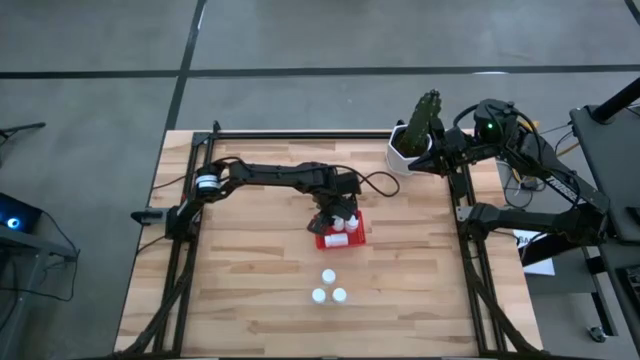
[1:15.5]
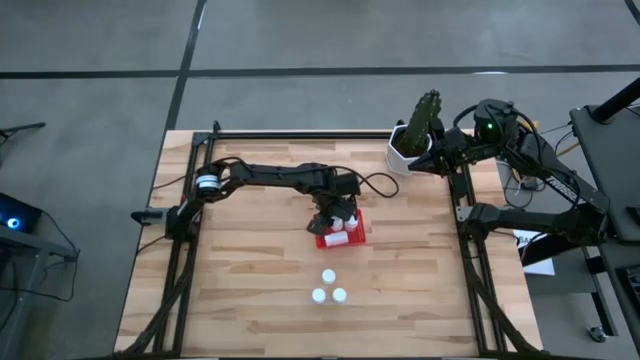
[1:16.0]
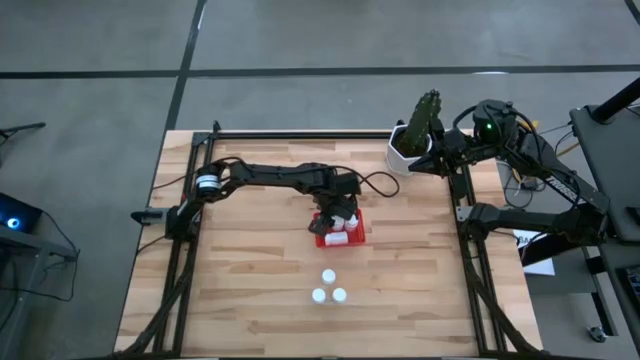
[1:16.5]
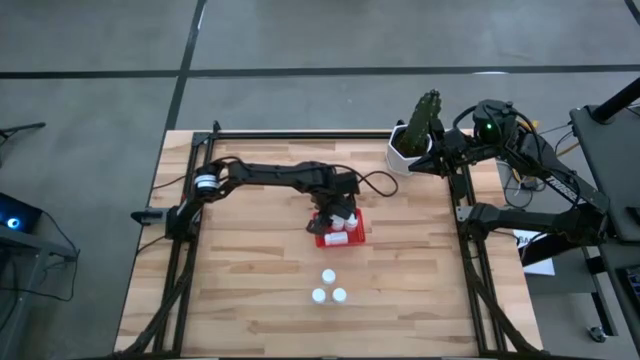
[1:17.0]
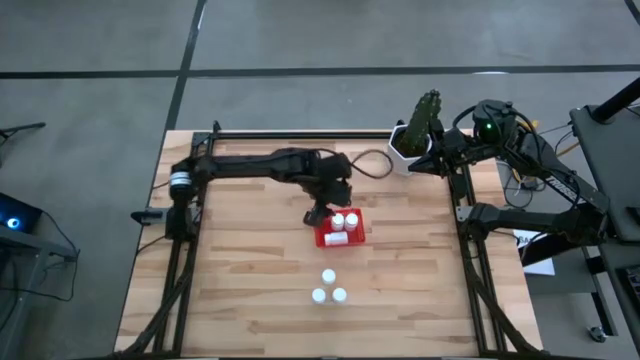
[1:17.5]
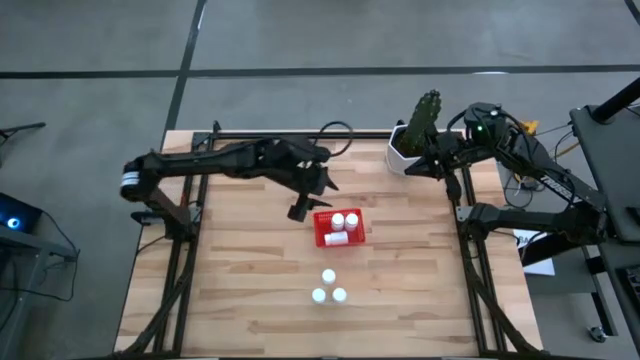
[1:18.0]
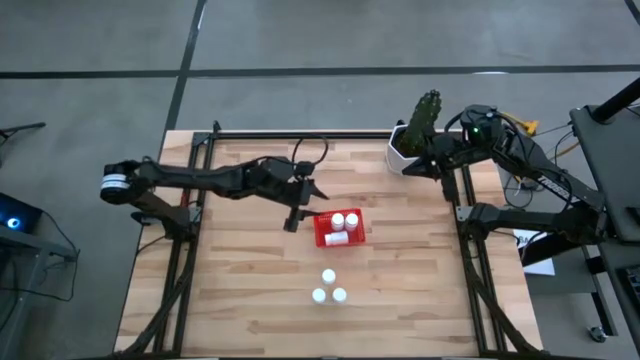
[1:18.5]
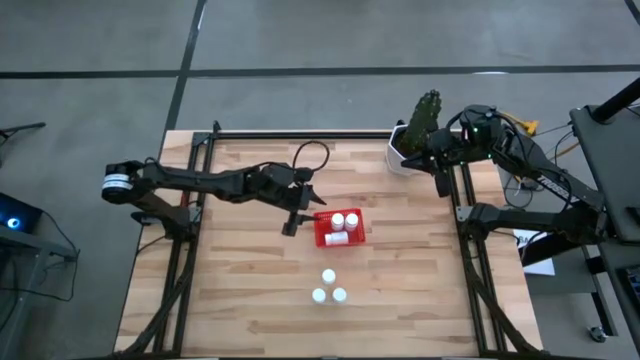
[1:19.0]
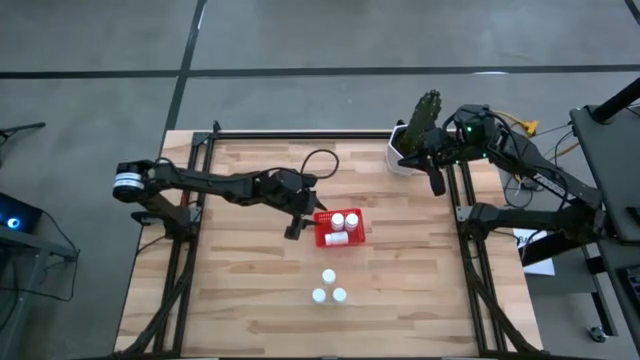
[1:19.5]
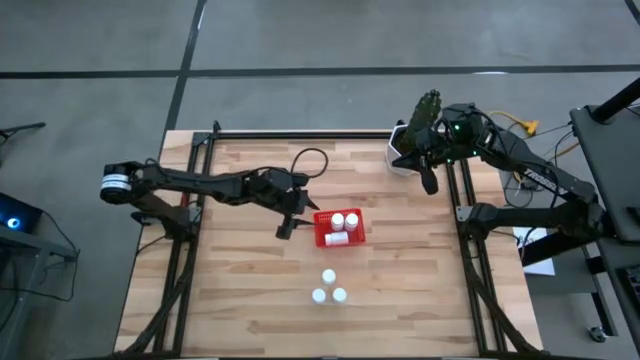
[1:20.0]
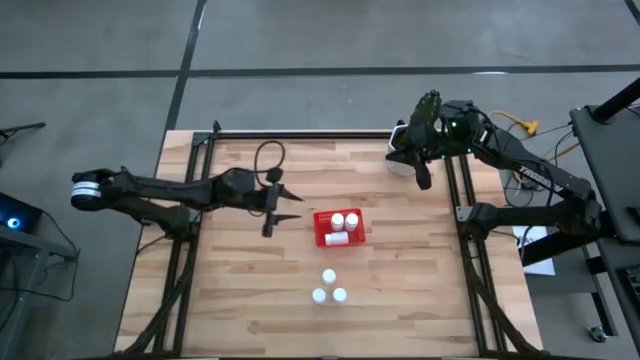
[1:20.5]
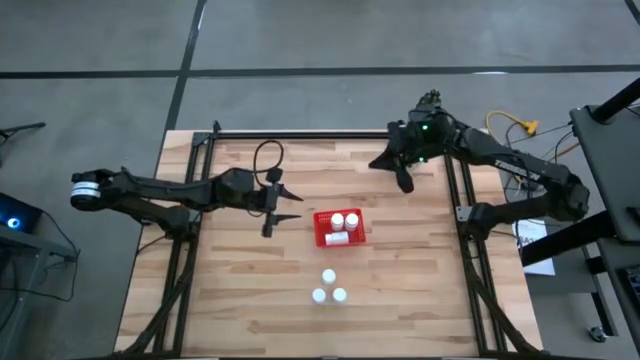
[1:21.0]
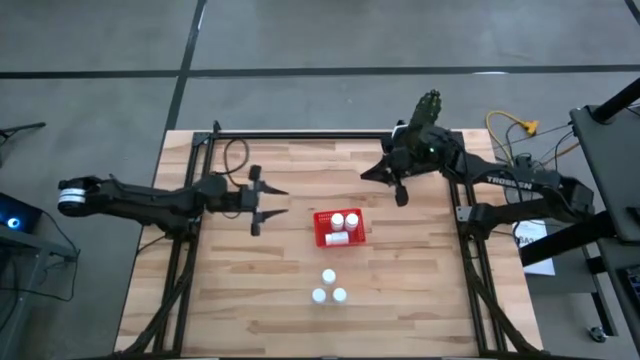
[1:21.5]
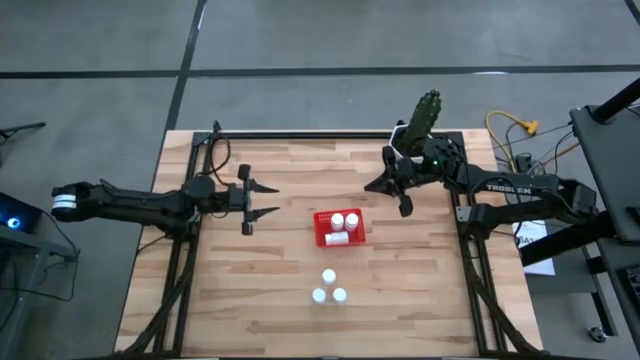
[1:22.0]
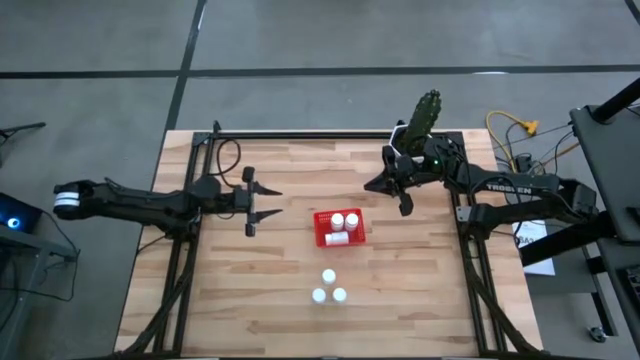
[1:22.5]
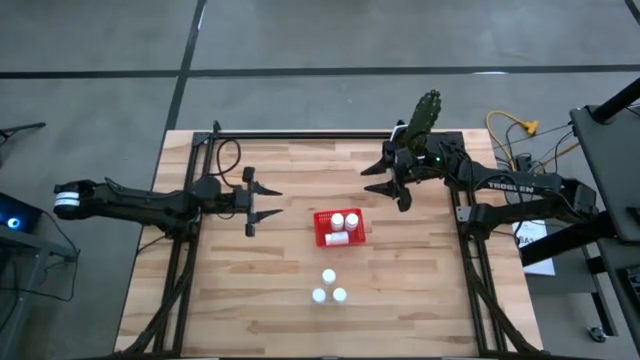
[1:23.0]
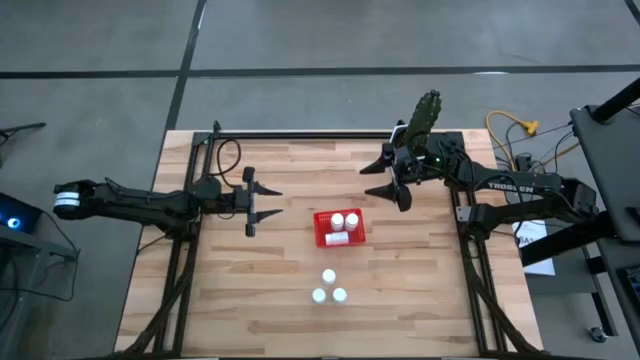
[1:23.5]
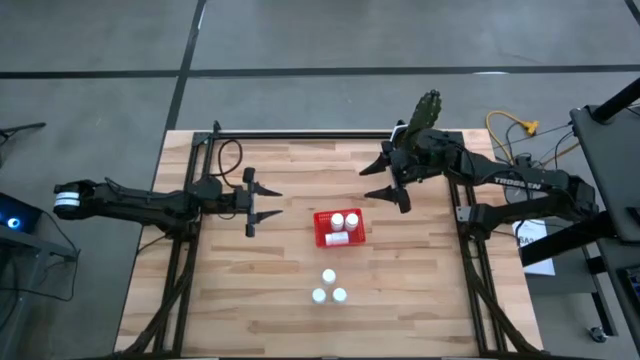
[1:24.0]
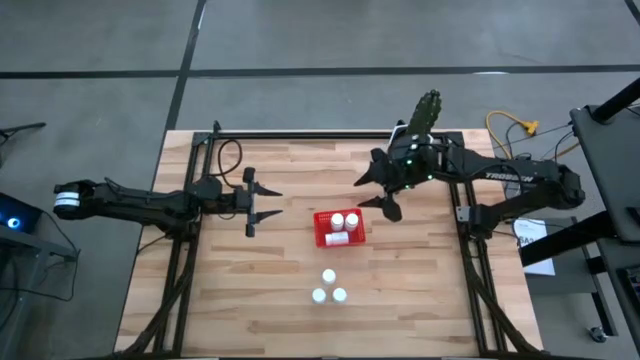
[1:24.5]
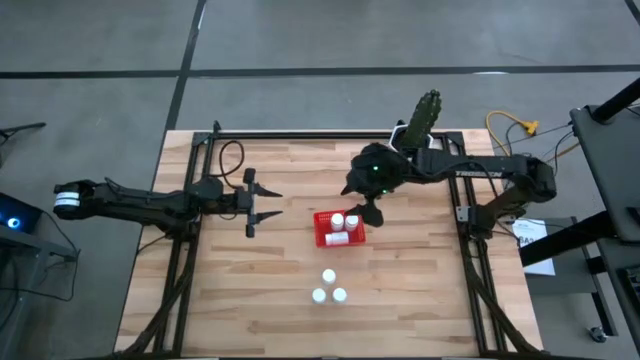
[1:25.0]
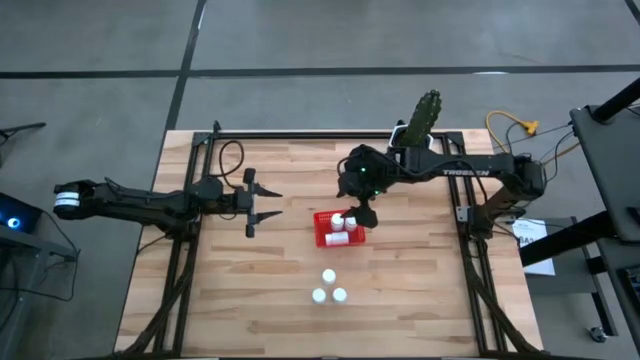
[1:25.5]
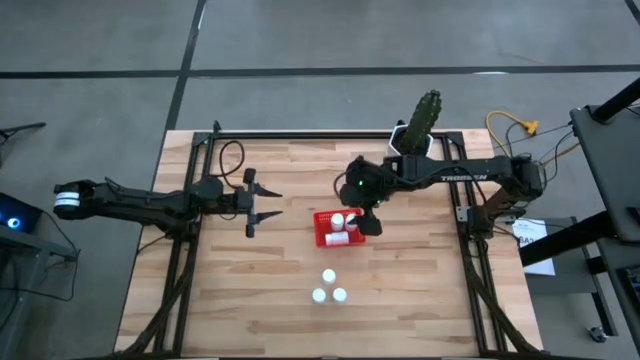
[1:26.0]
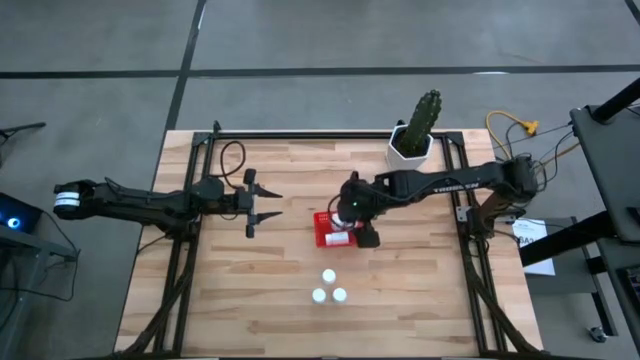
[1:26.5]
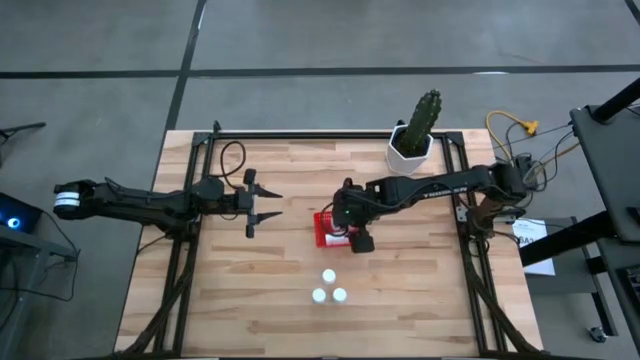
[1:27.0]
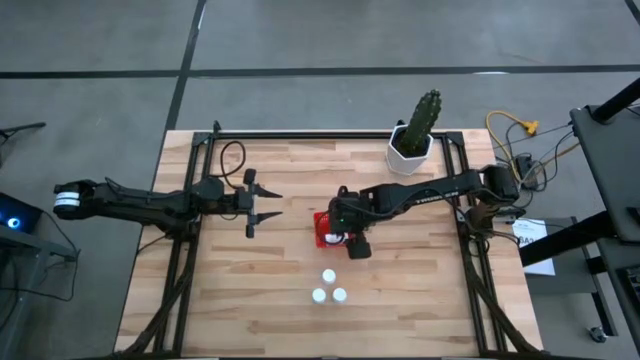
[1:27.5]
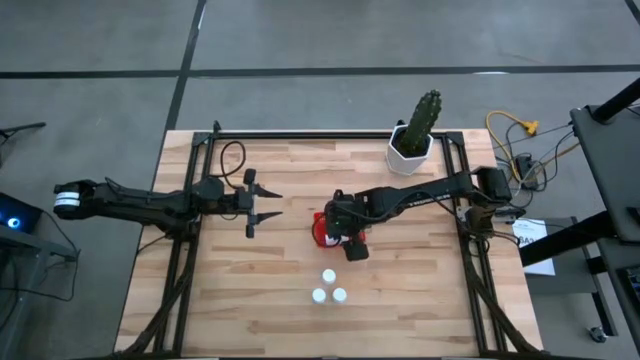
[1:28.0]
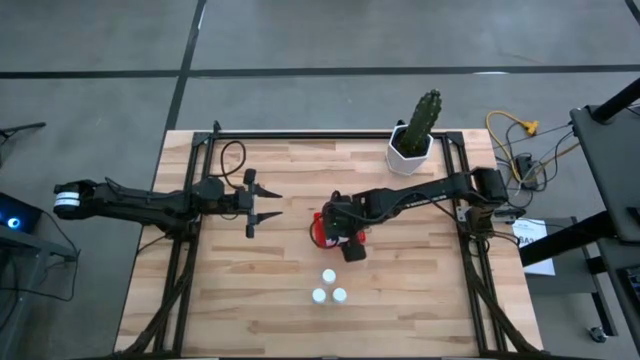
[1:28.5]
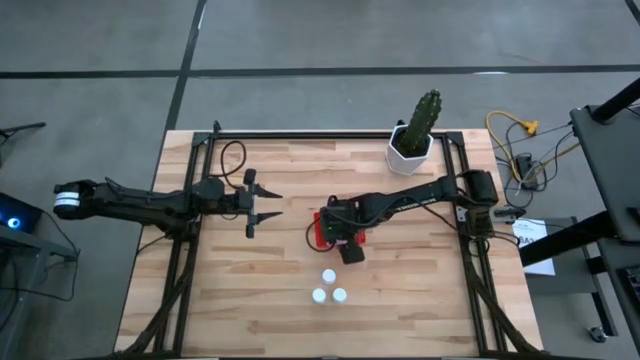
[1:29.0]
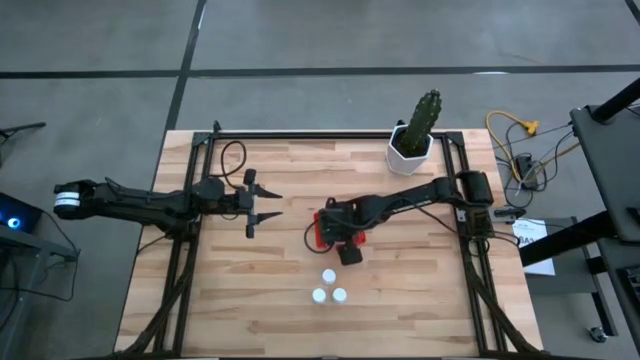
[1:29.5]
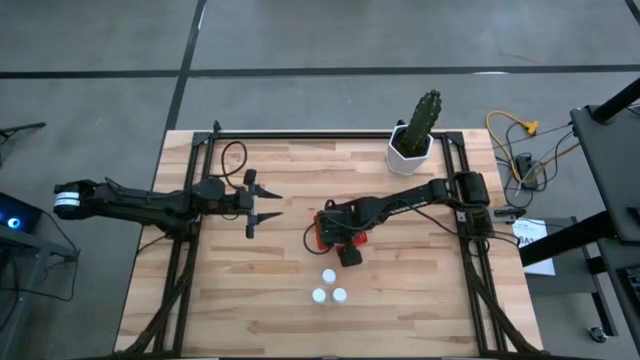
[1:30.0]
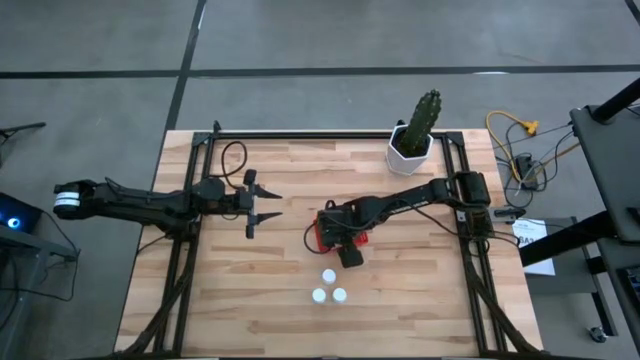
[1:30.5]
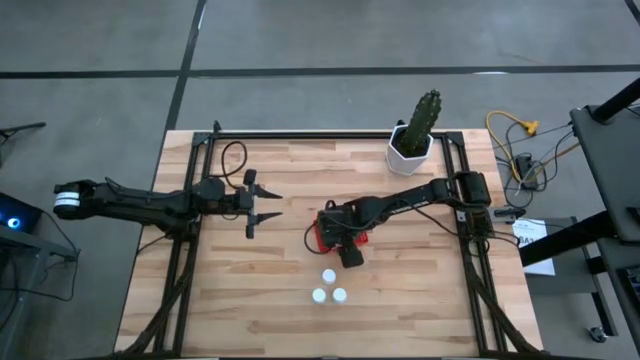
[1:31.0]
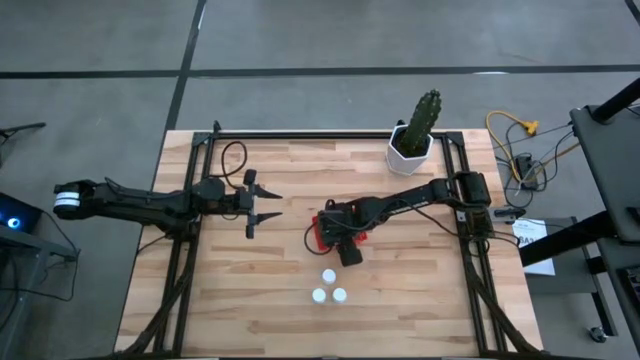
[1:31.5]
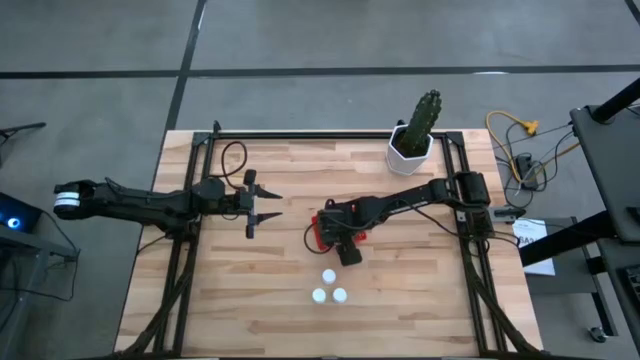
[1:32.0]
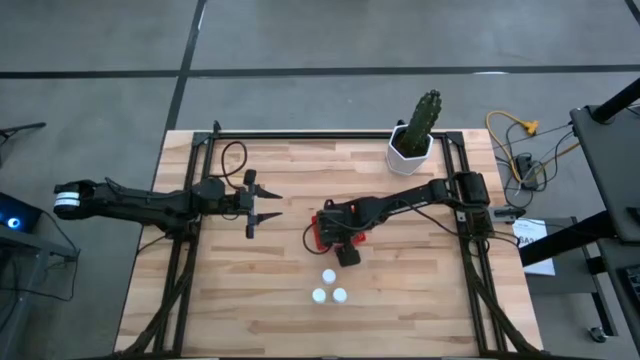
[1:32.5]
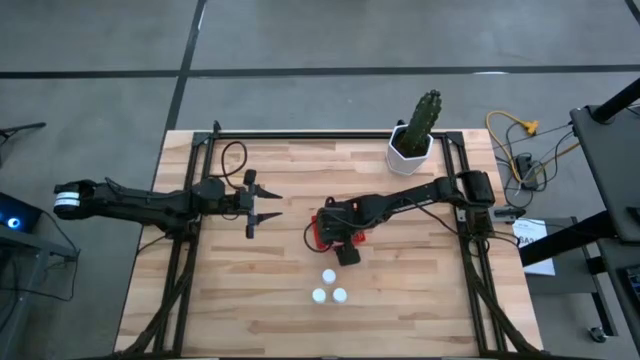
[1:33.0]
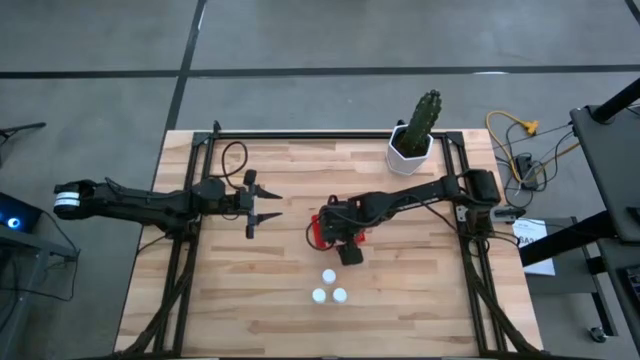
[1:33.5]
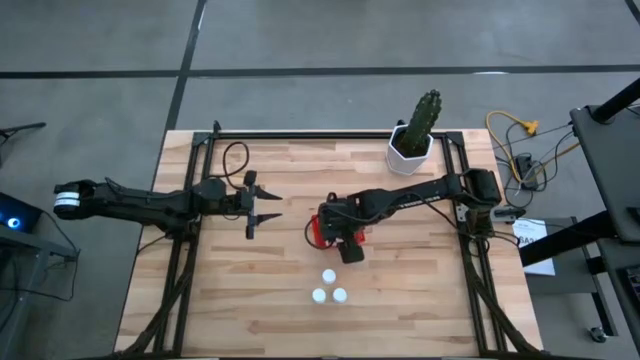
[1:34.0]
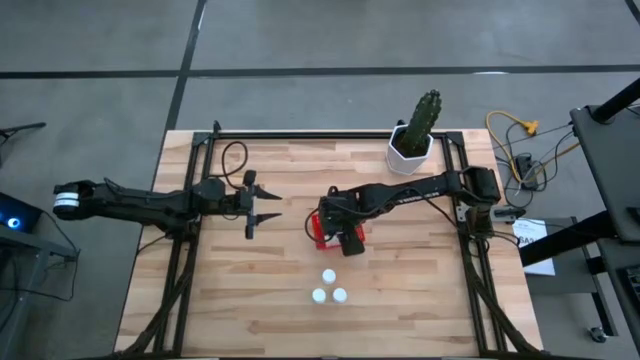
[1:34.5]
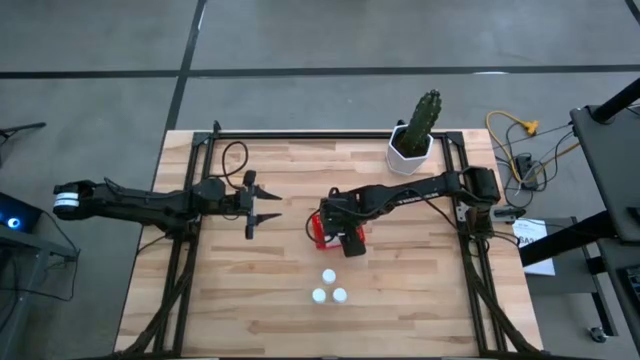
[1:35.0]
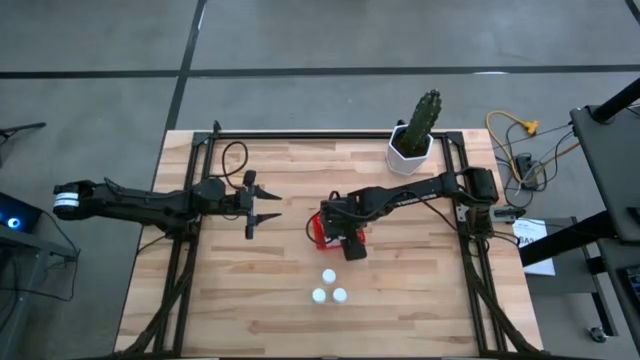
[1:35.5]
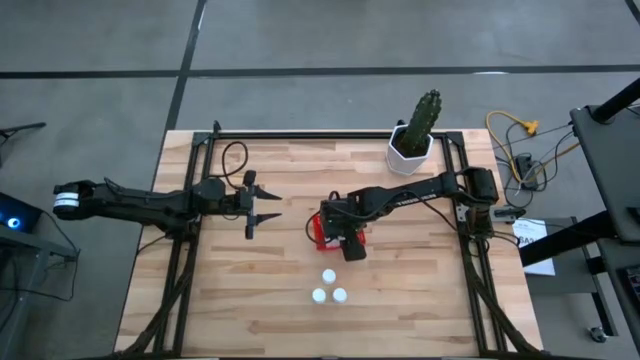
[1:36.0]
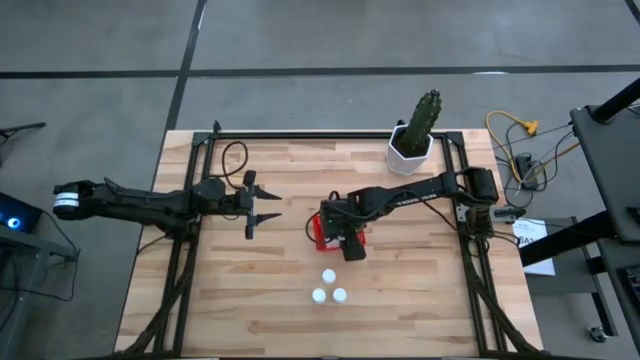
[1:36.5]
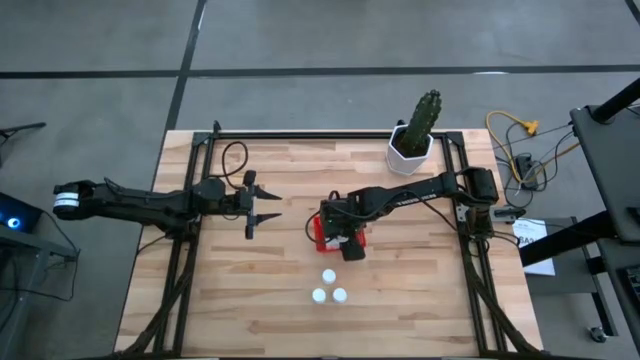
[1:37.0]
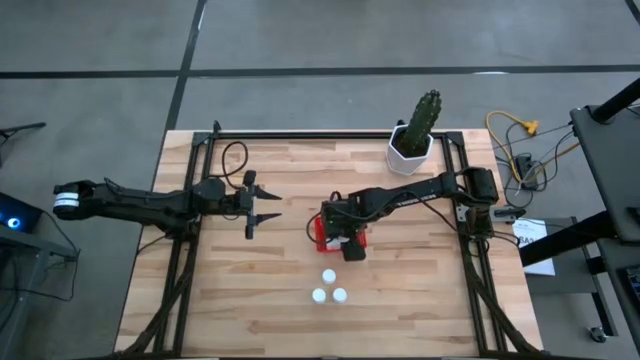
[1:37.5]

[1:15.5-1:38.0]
Task: Pick and place pill bottles into a basket
Adjust the white pill bottles in the red basket
